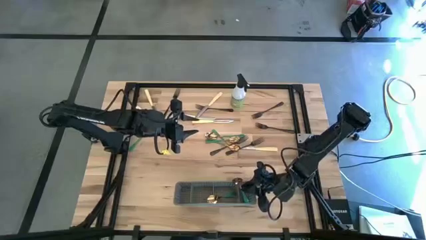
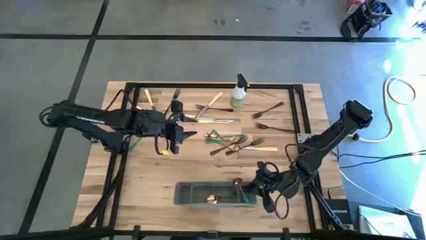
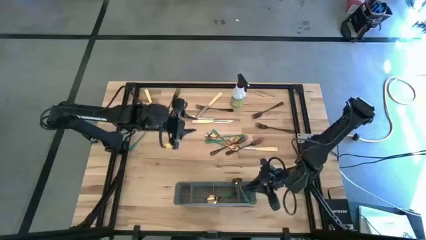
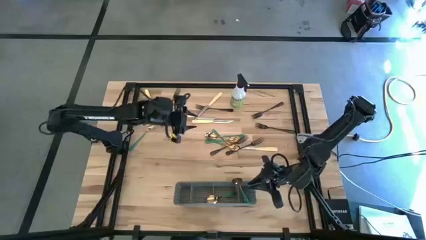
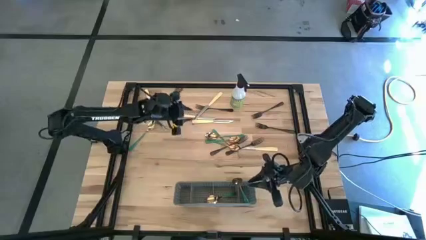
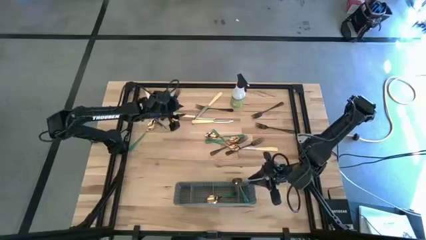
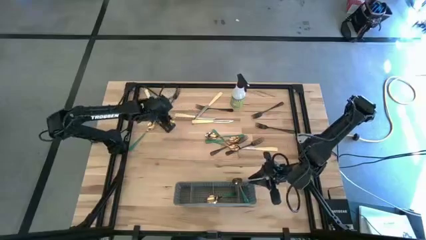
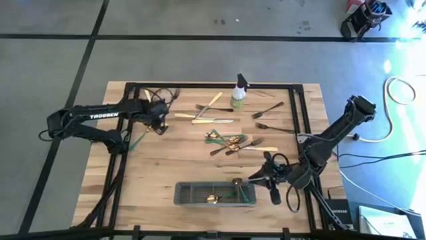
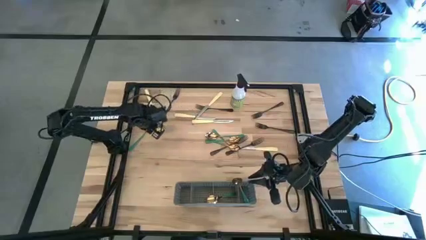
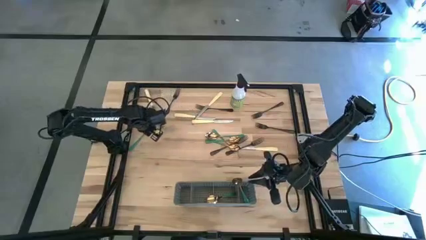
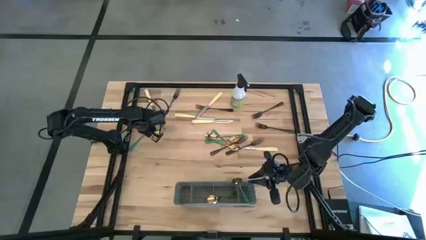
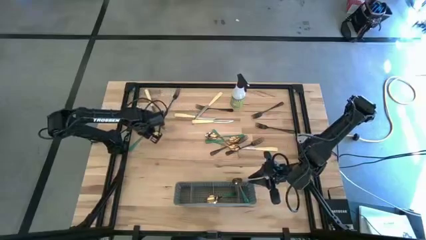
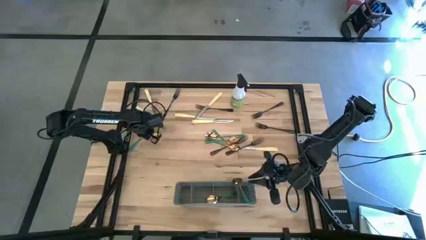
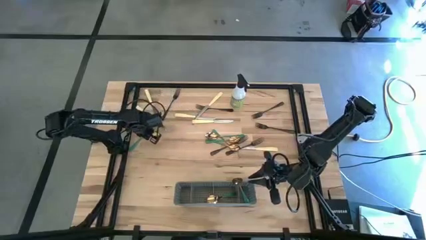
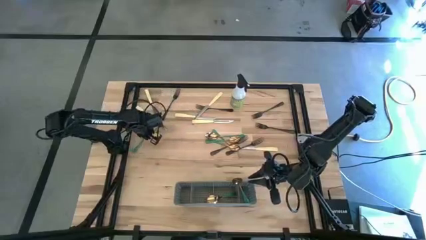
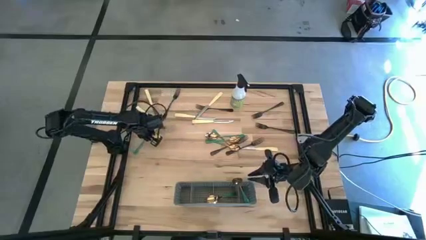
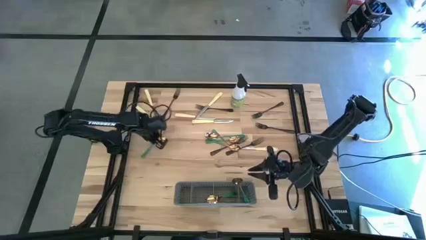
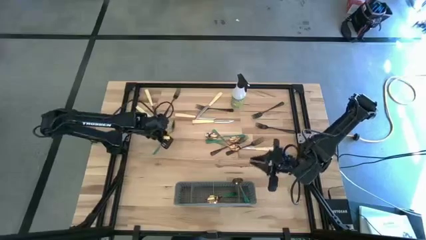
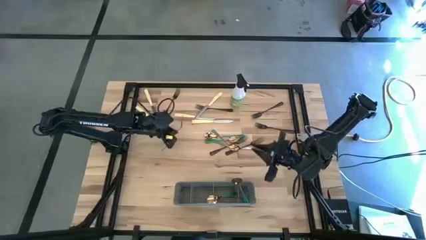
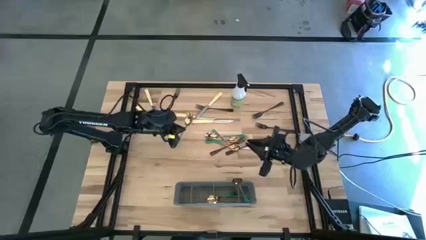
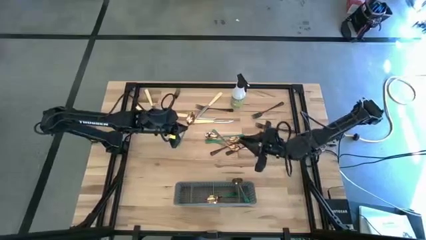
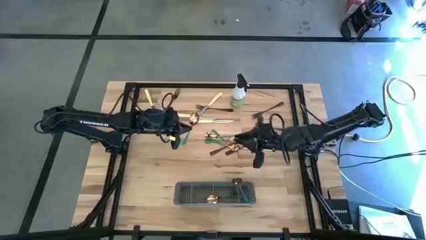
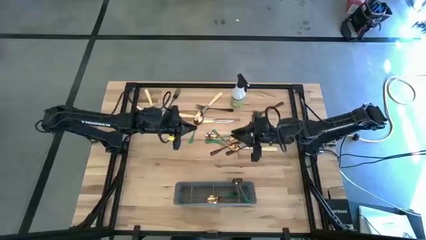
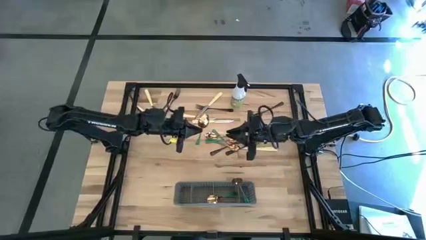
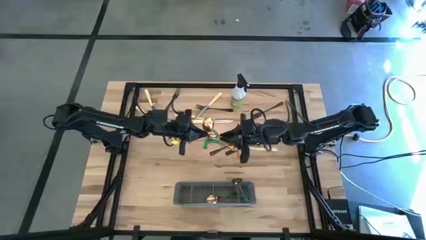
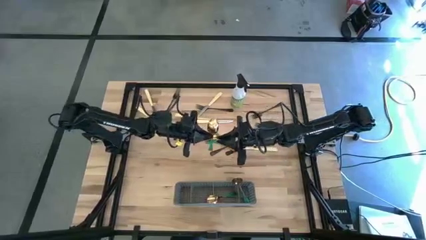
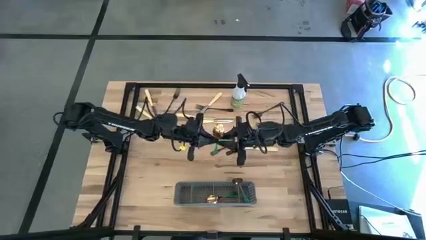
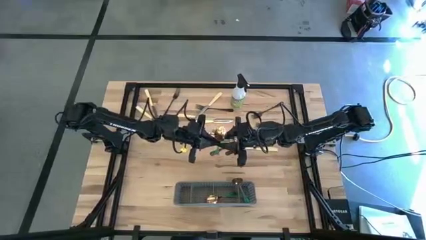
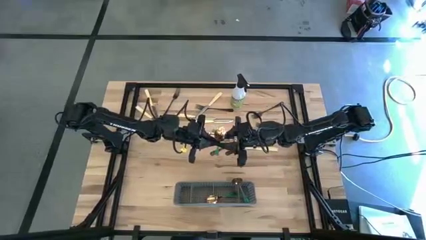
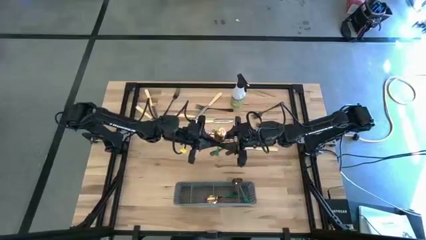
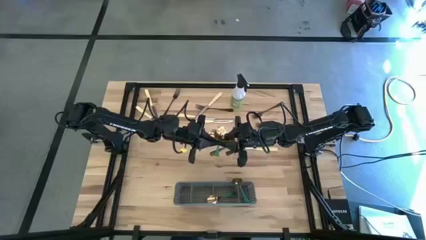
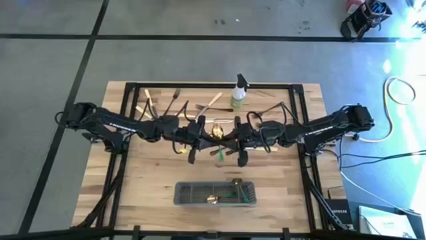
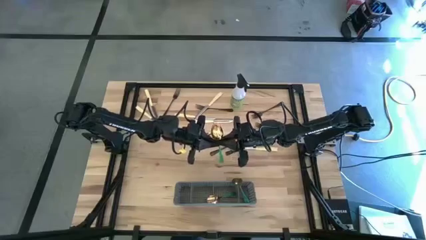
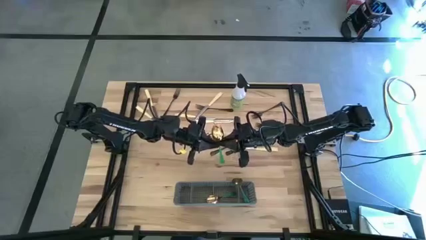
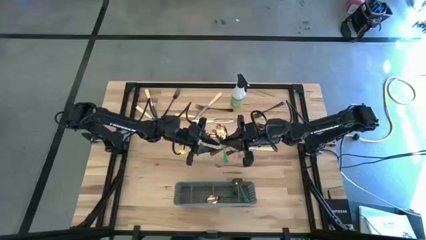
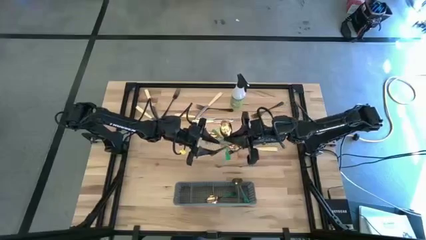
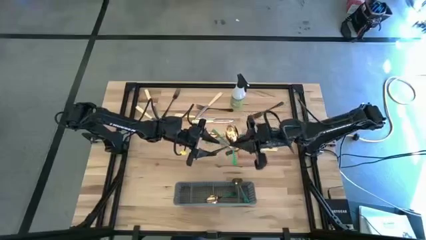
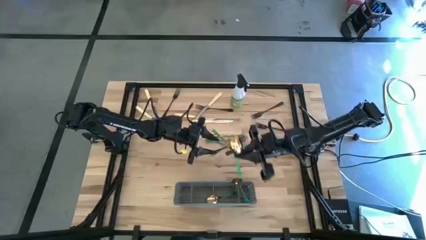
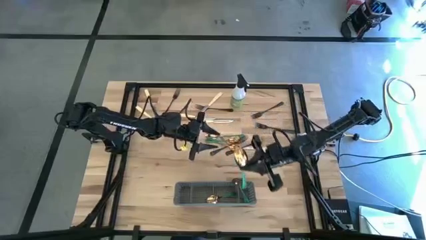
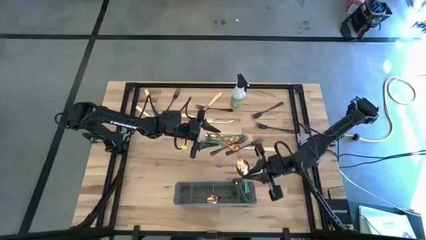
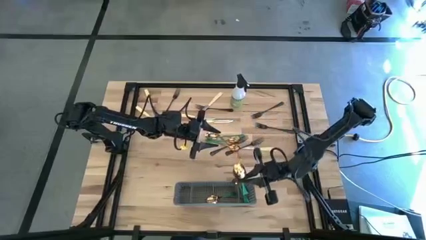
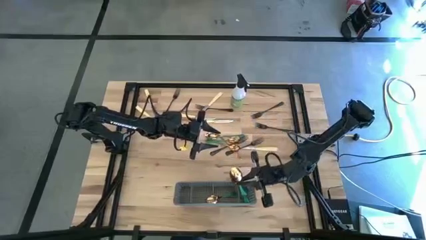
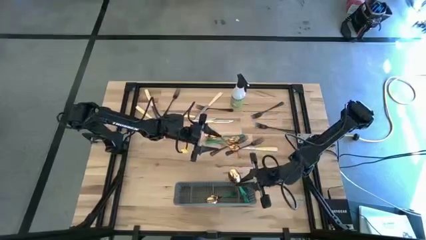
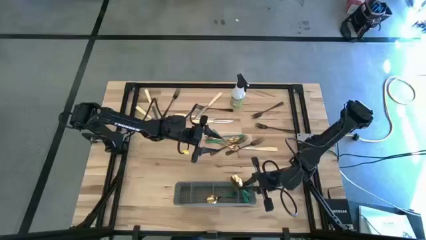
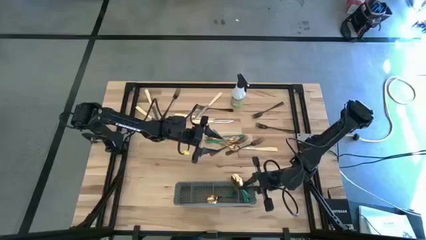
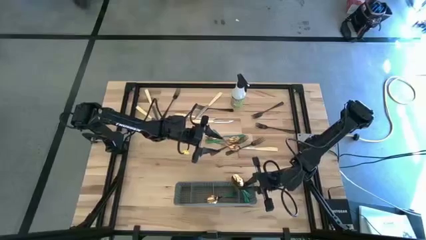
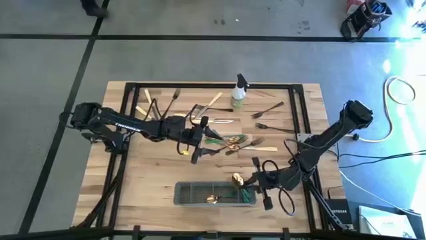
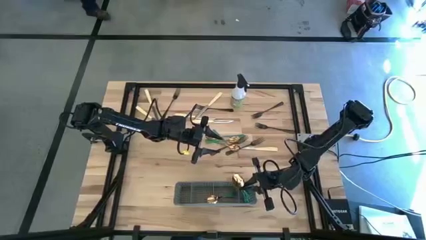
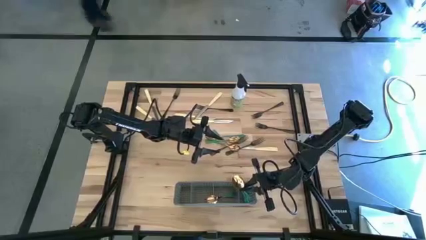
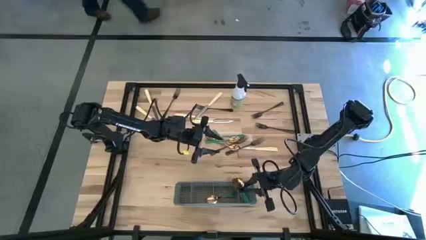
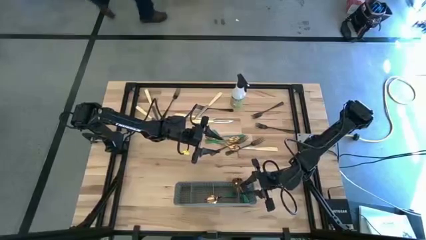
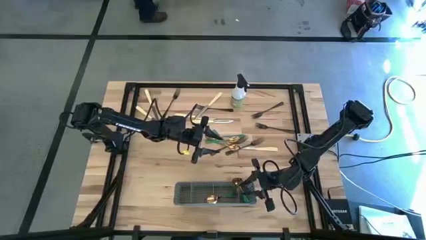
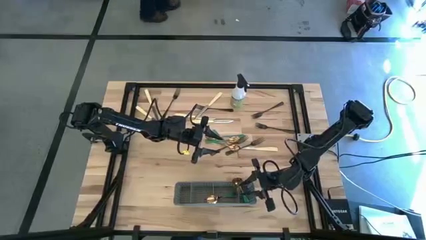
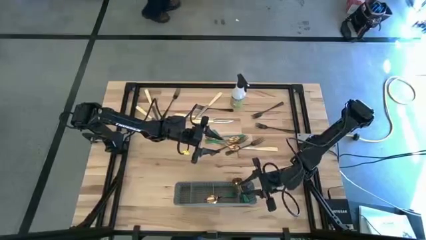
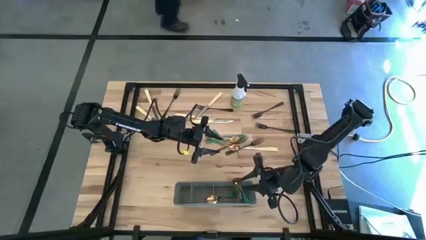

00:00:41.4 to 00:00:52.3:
Task: Sort silverware
Put the left green spoon into the gray cutlery rack

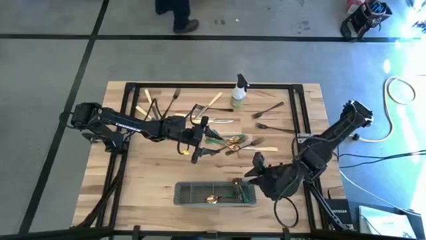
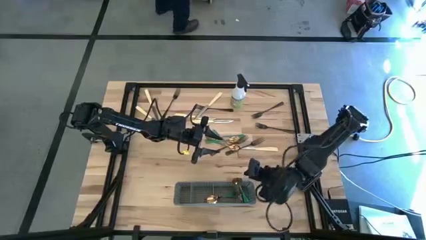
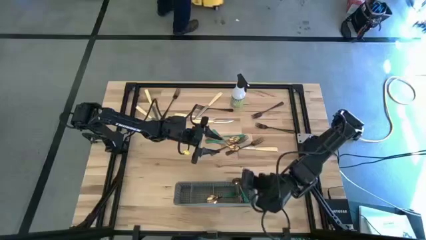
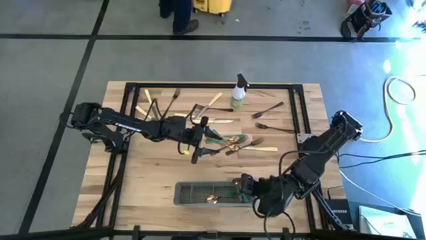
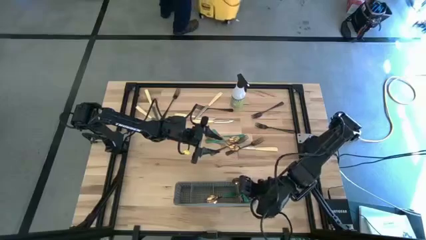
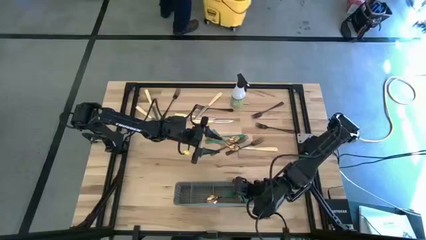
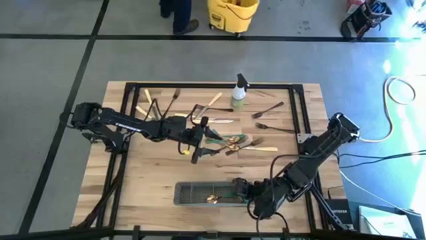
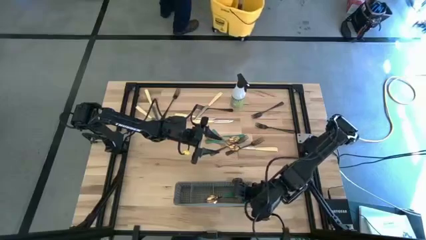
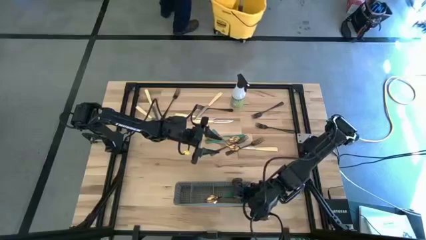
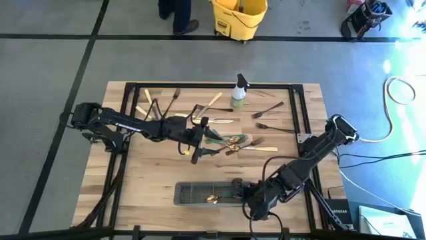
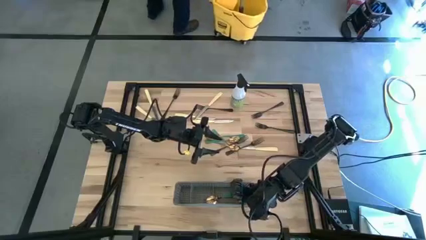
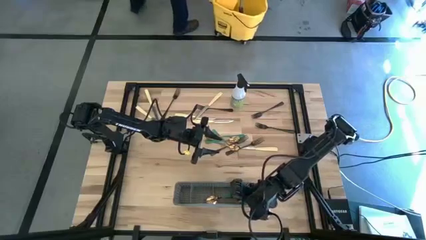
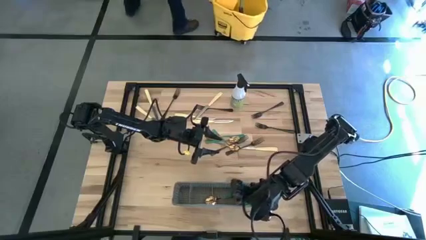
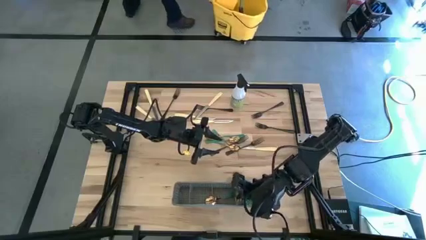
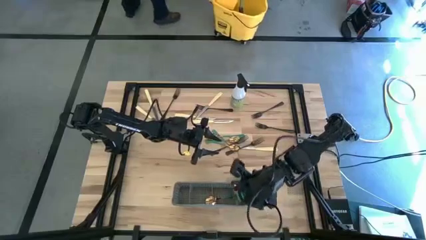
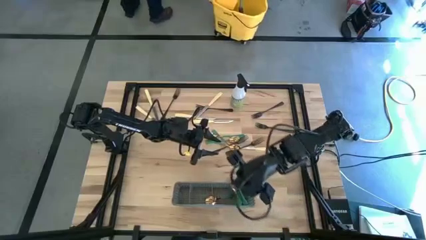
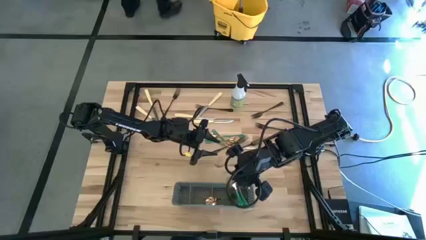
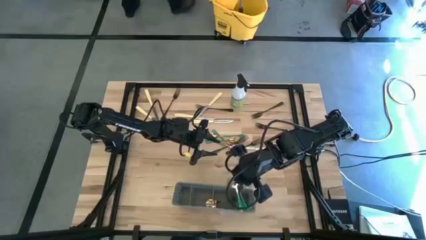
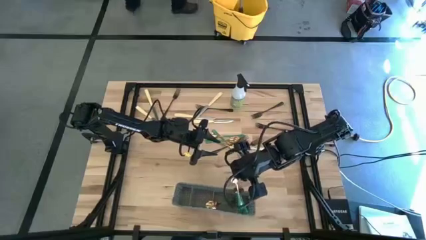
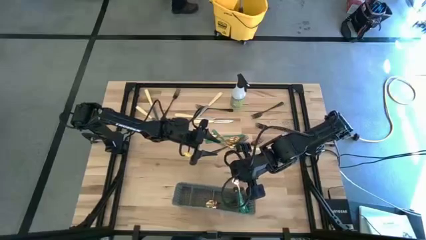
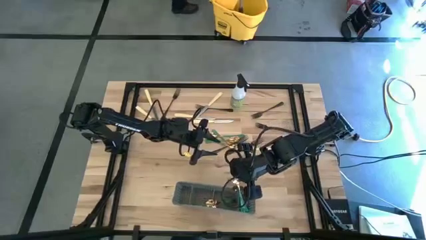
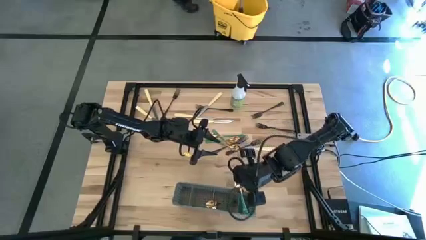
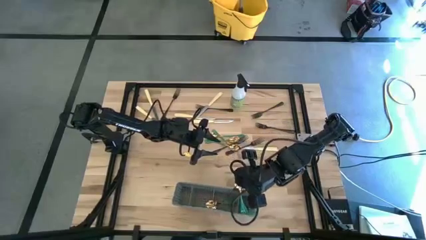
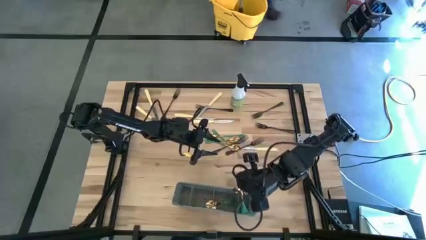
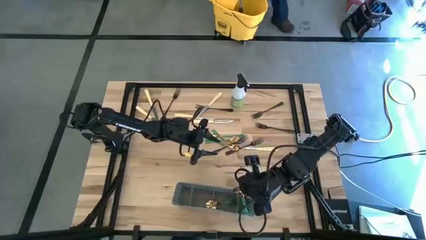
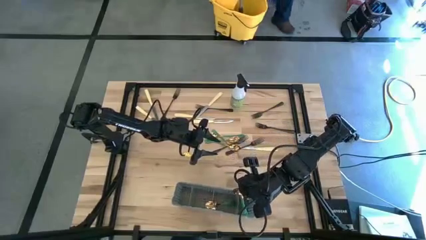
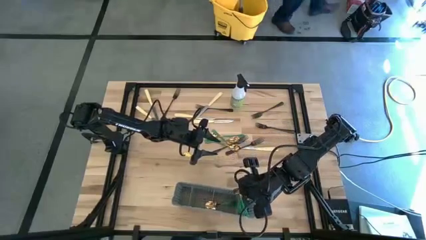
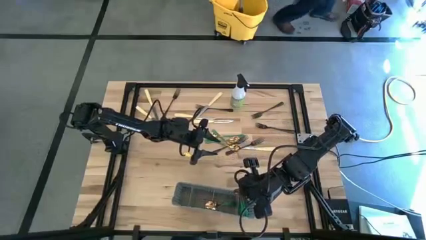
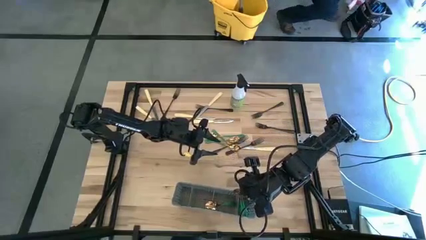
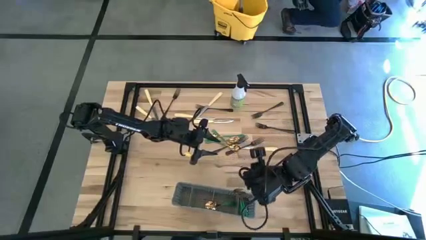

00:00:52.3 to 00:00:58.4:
Adjust the green spoon to the right position
